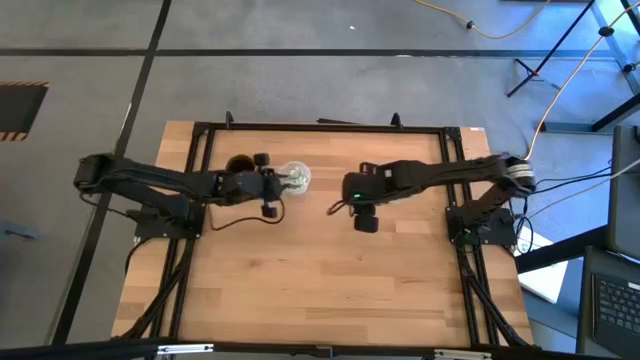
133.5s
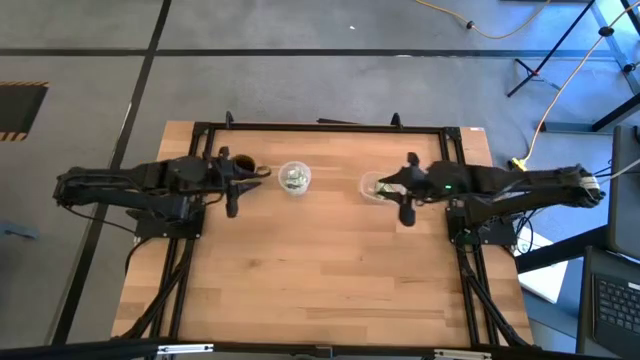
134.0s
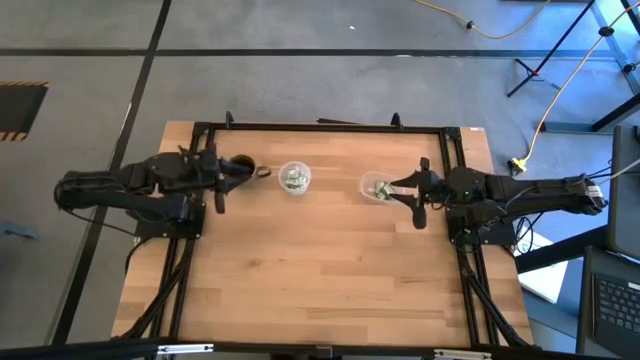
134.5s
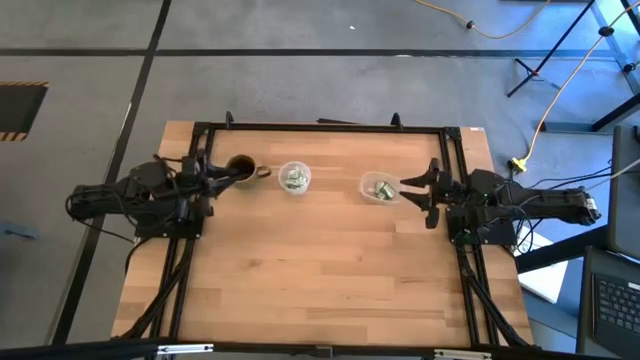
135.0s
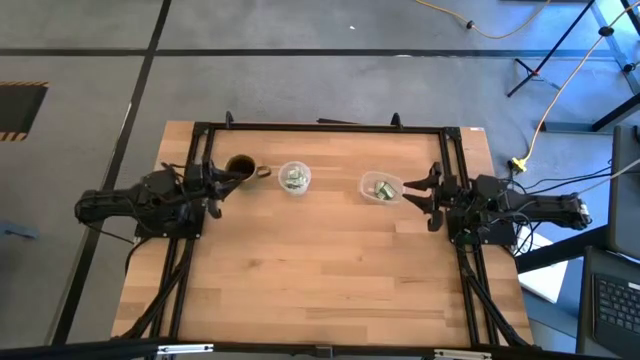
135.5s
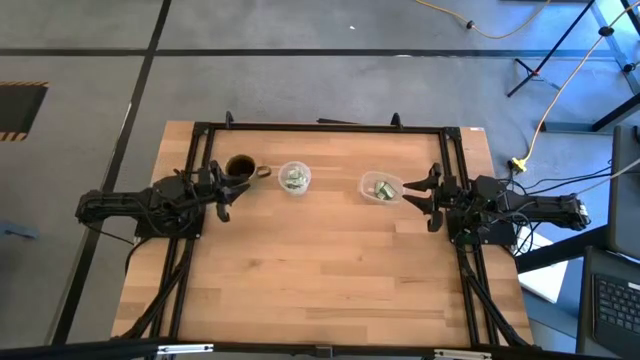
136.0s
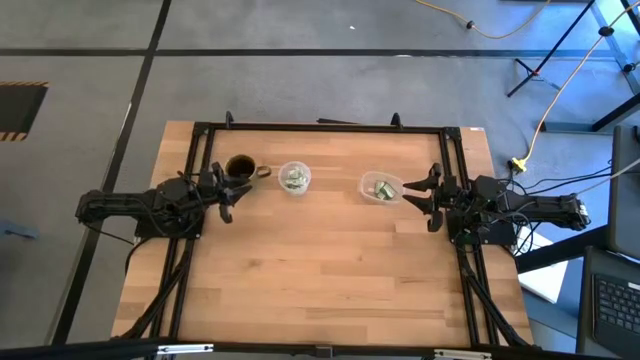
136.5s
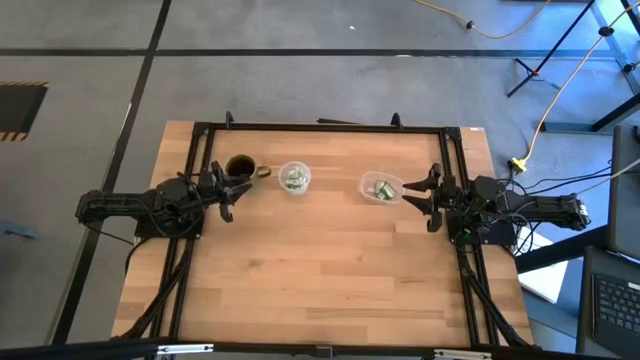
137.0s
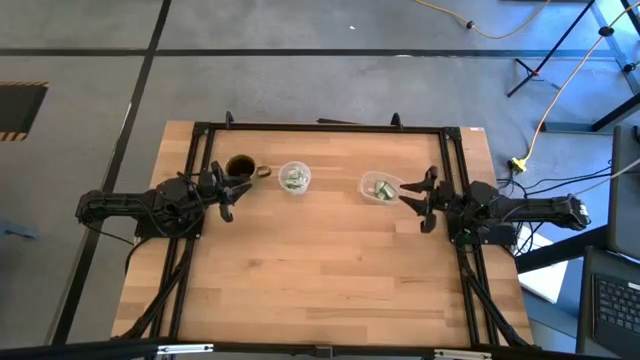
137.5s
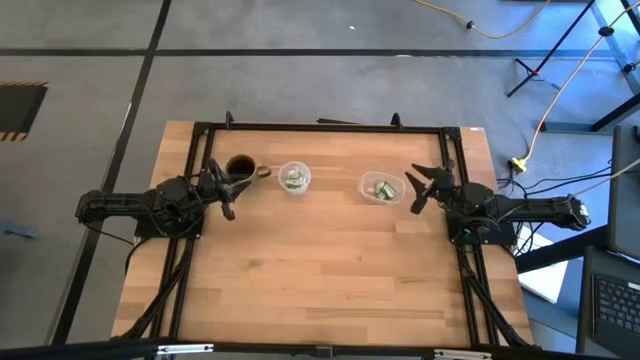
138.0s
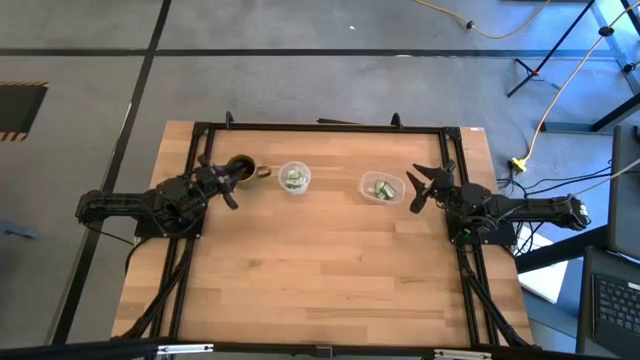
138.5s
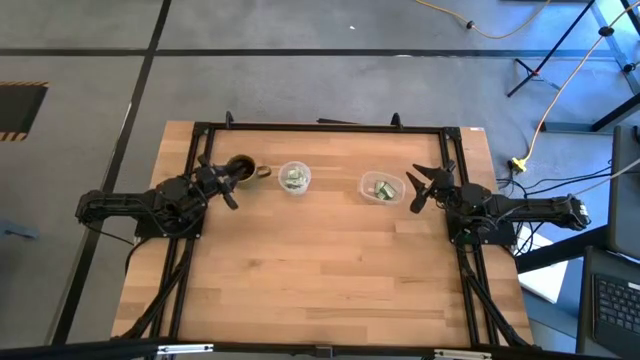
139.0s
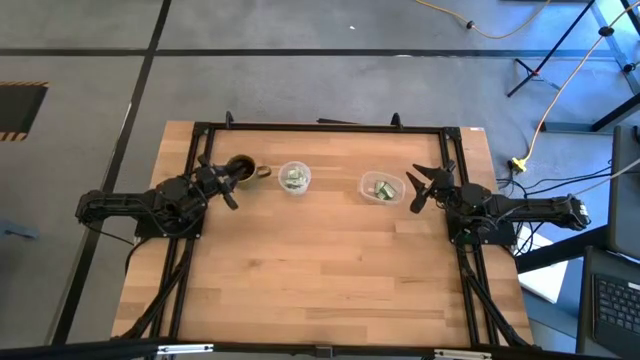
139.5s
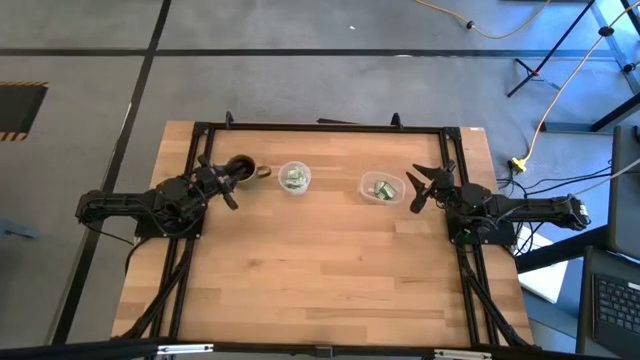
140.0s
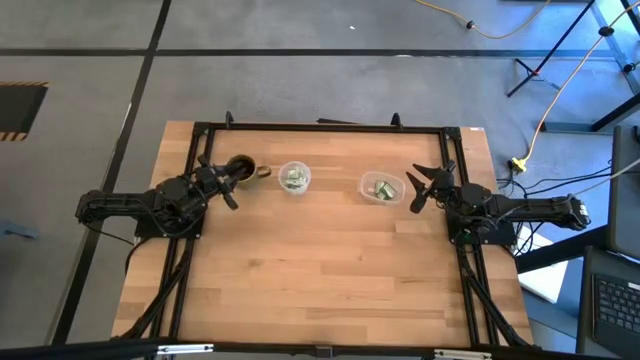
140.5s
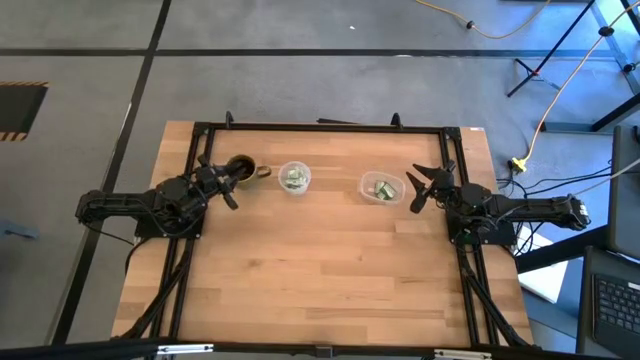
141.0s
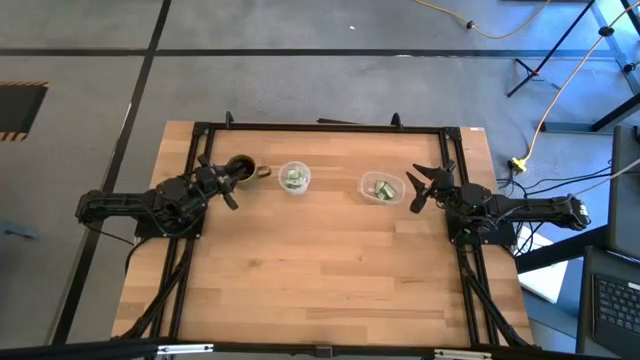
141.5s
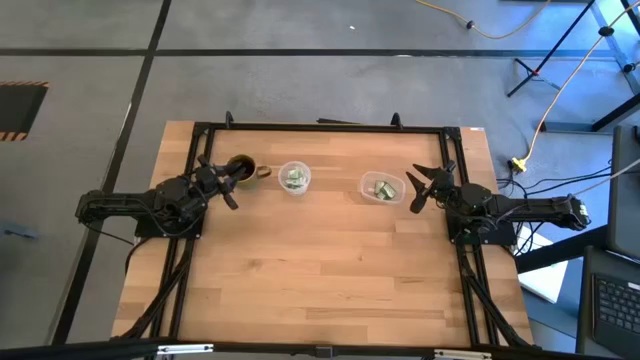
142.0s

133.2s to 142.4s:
Task: Pick and place items into bin
Return to Home Position

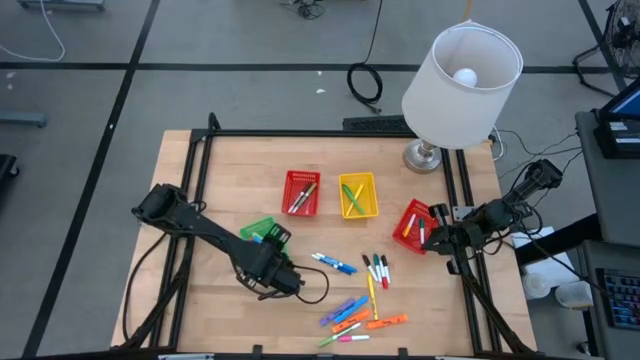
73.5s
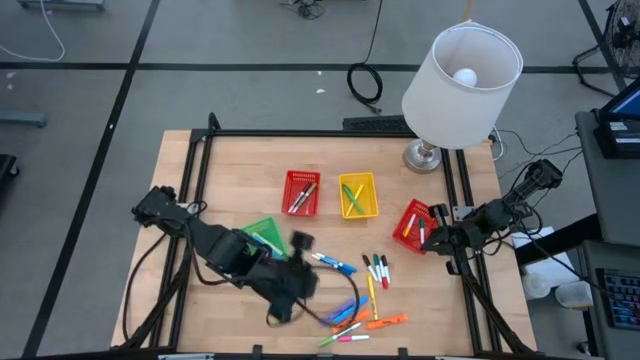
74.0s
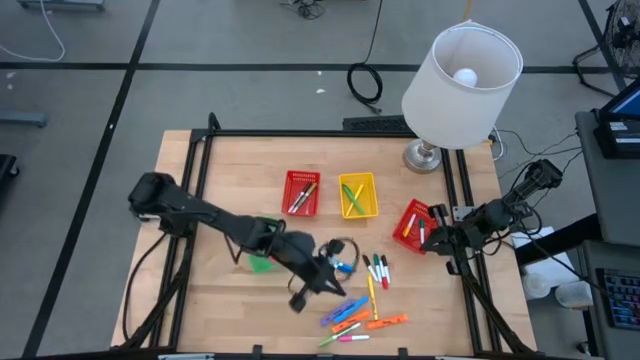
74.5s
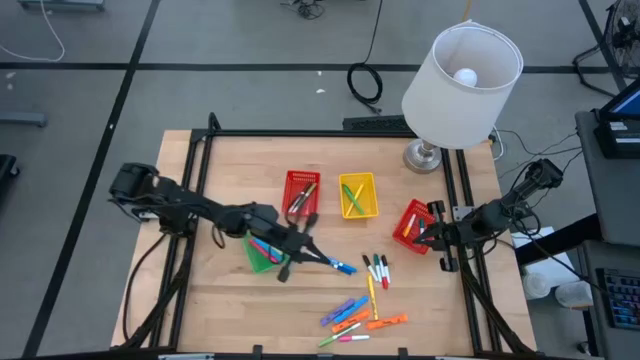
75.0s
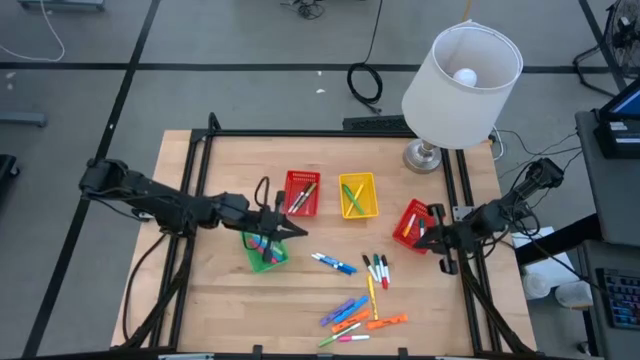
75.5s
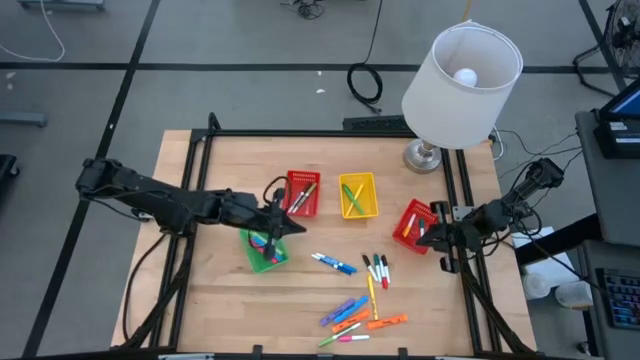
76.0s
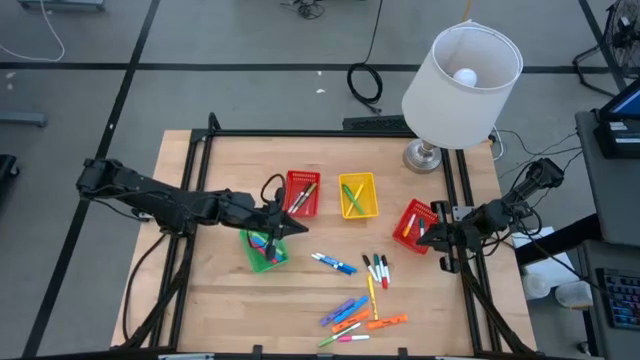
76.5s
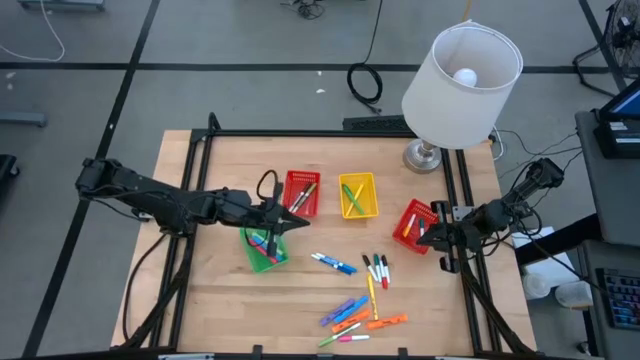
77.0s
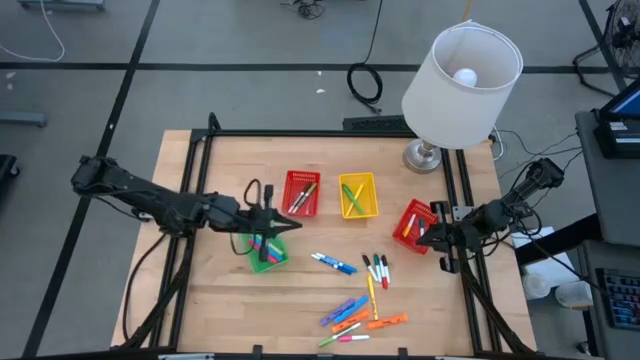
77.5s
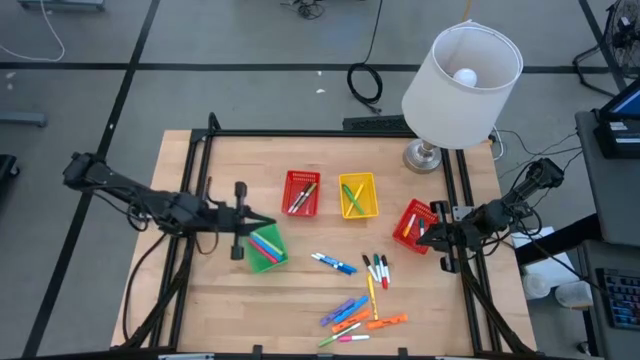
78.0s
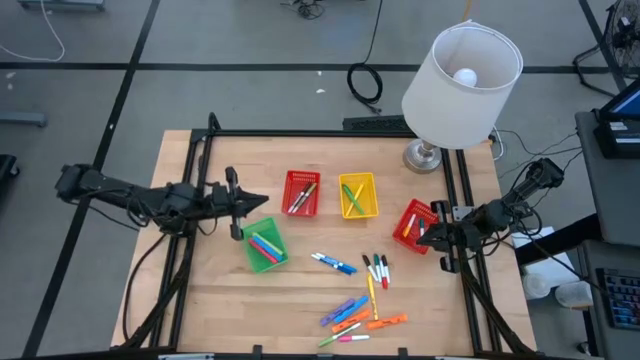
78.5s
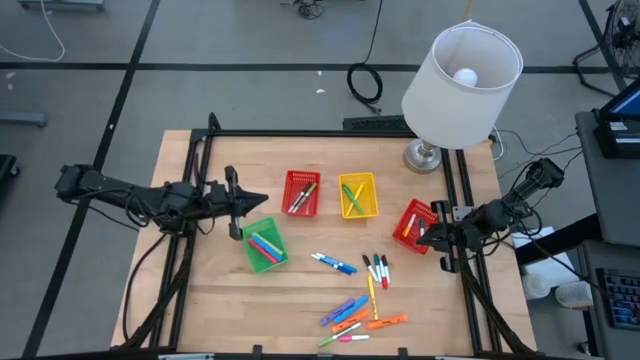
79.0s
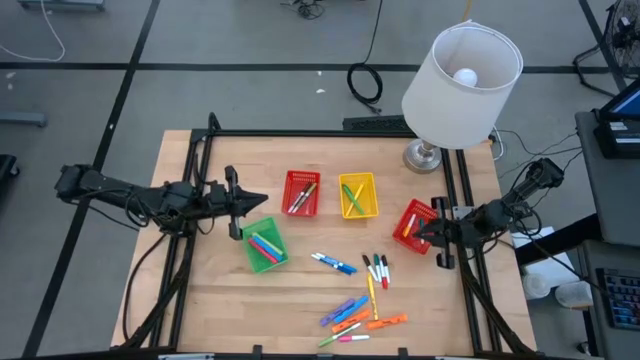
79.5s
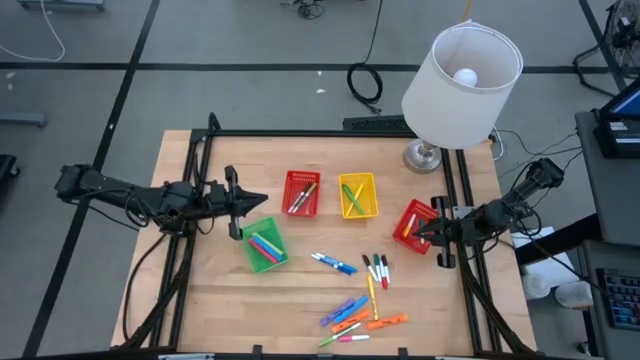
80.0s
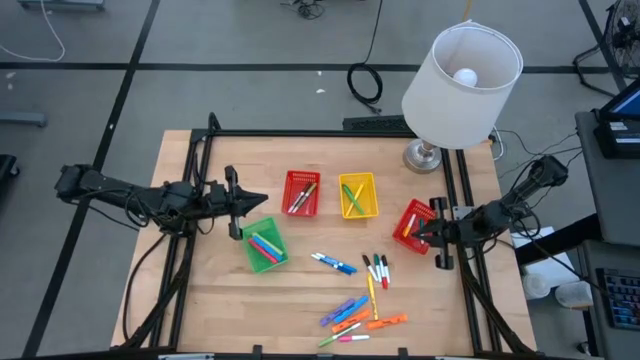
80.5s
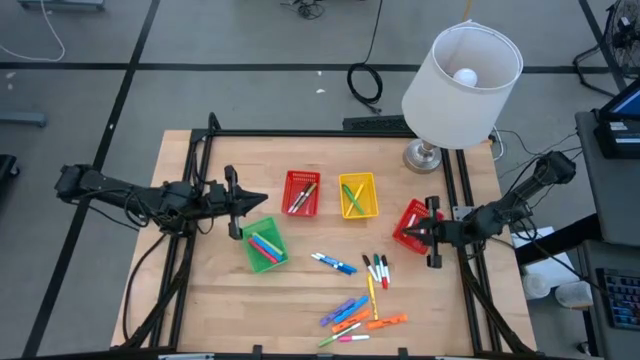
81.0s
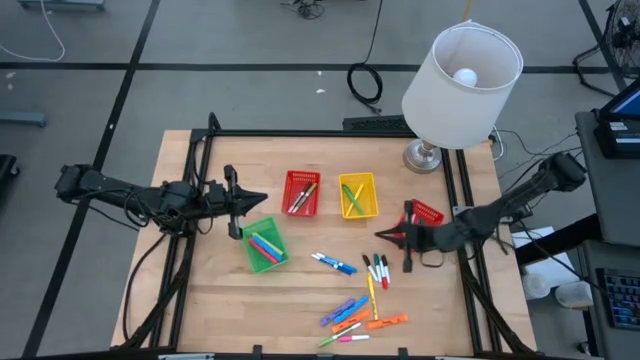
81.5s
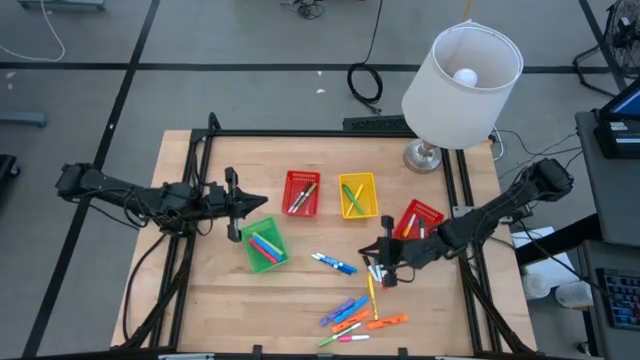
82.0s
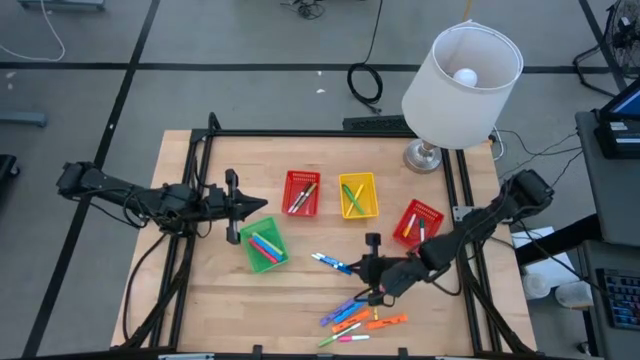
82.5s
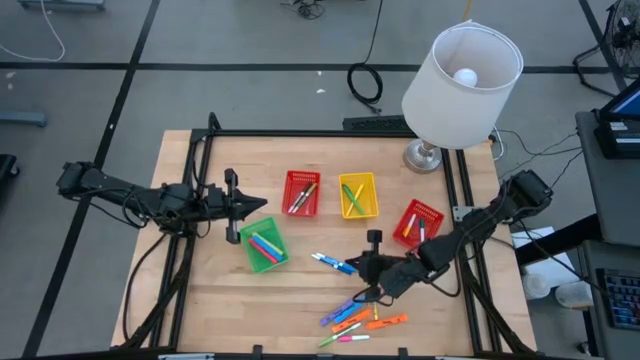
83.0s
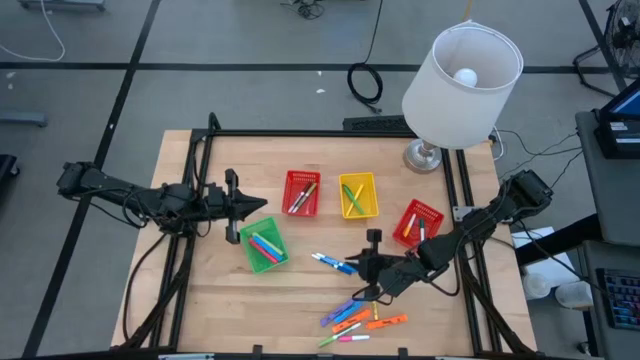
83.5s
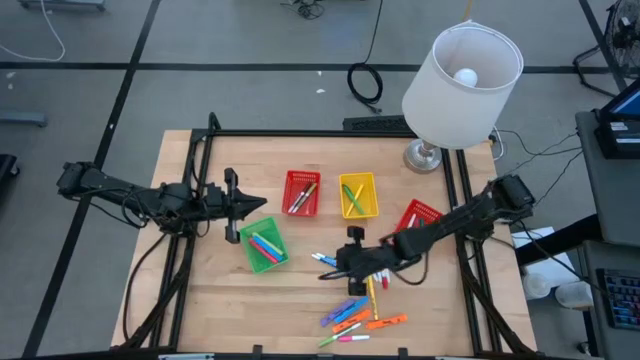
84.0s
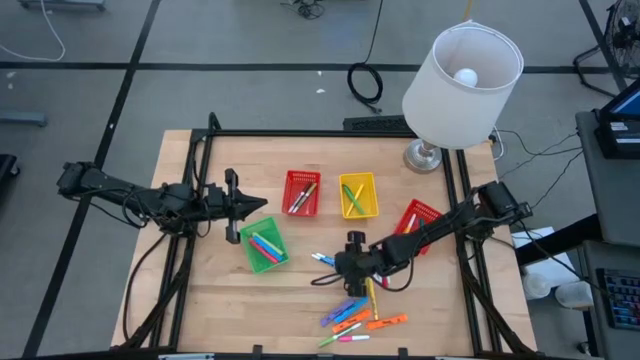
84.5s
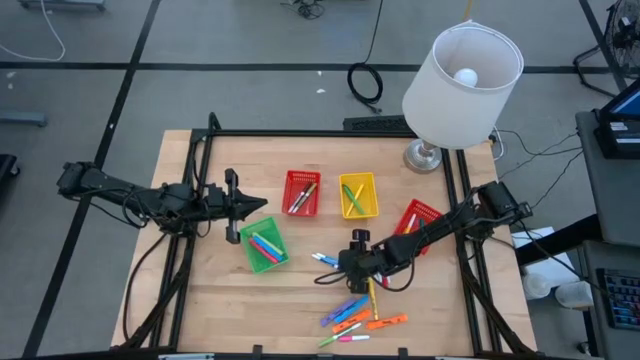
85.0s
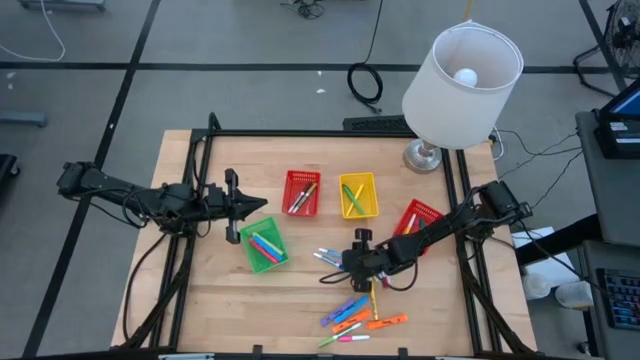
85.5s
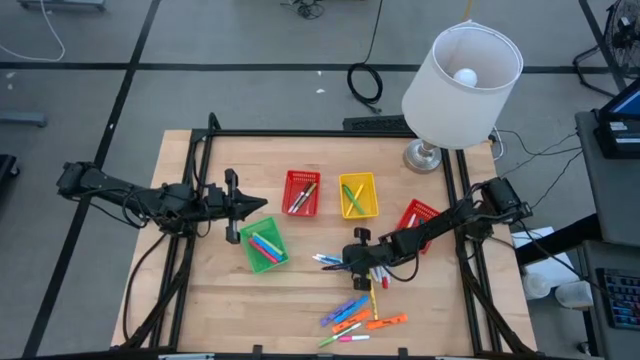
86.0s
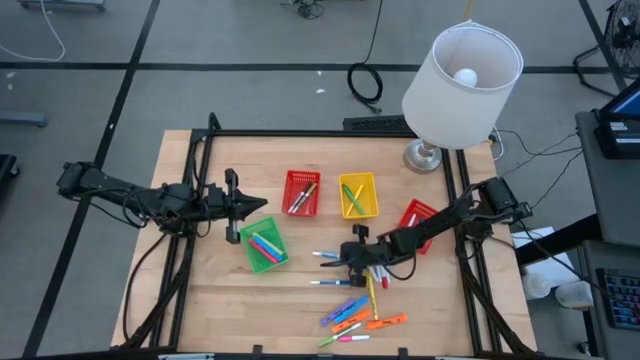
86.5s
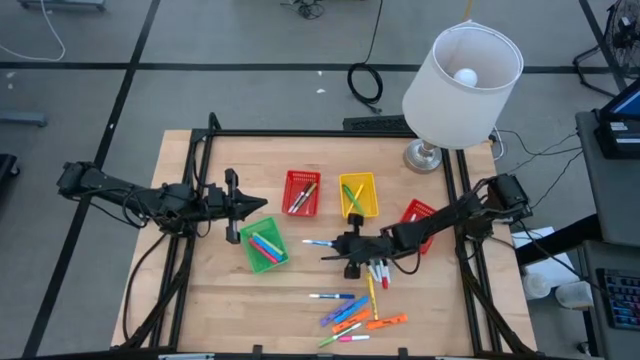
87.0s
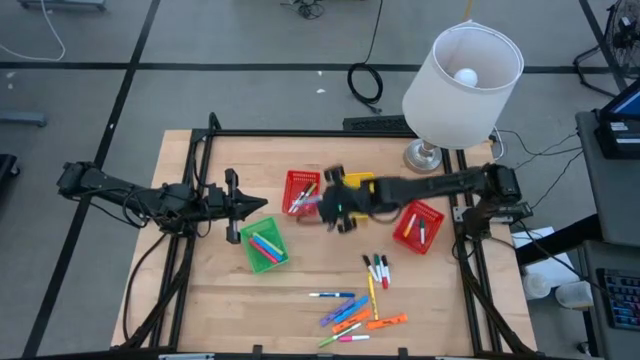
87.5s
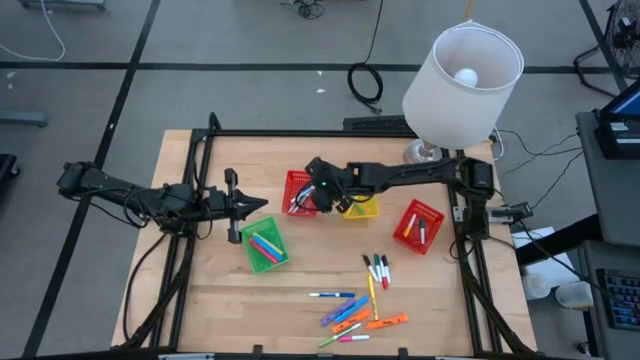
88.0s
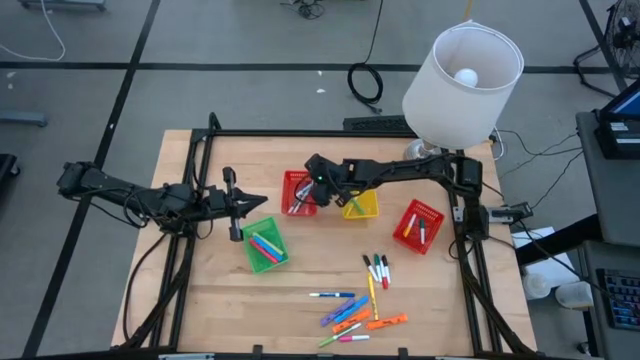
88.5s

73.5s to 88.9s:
Task: Pick & Place Markers
Put the light blue marker into the left red bin
